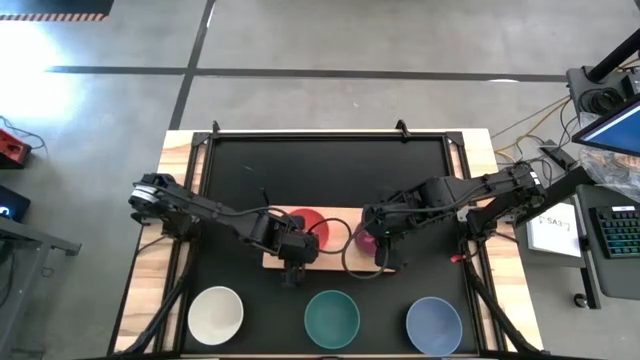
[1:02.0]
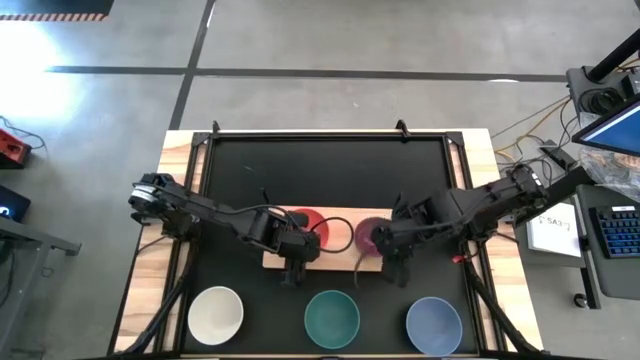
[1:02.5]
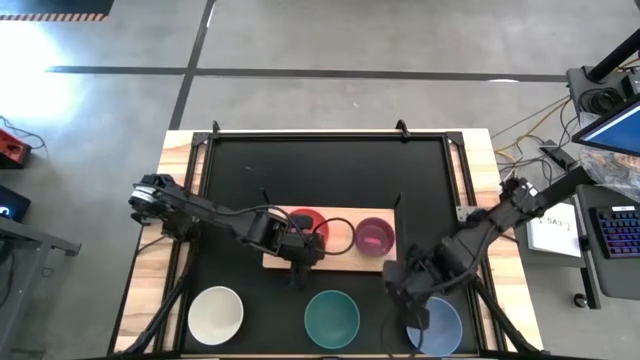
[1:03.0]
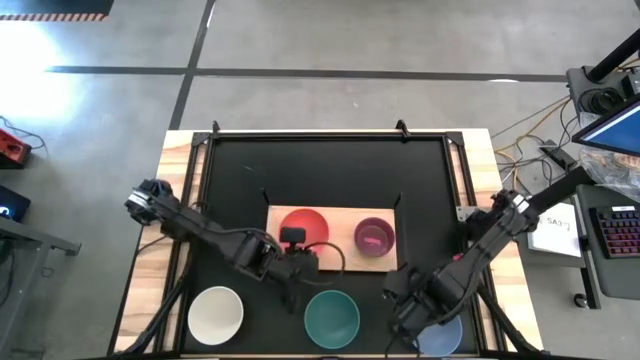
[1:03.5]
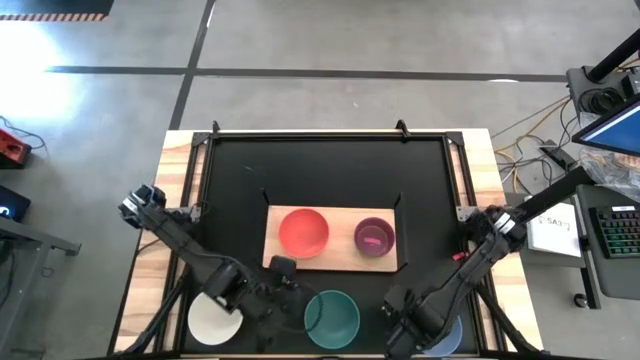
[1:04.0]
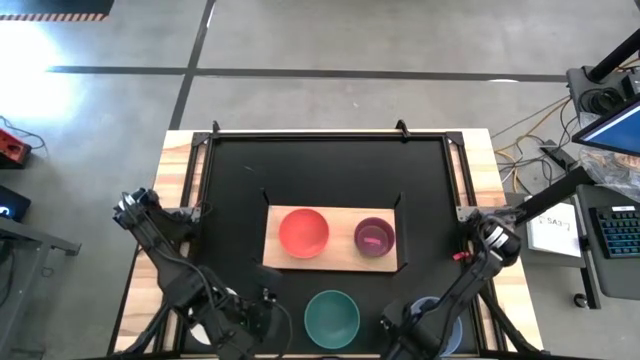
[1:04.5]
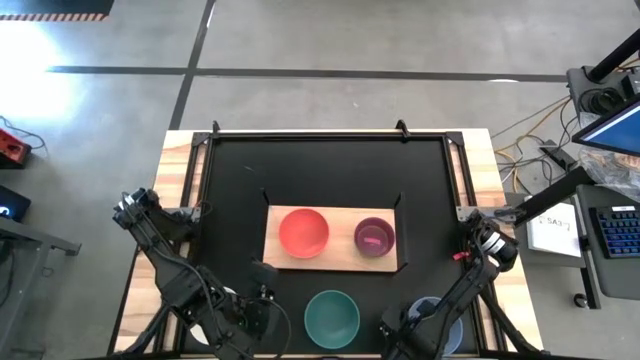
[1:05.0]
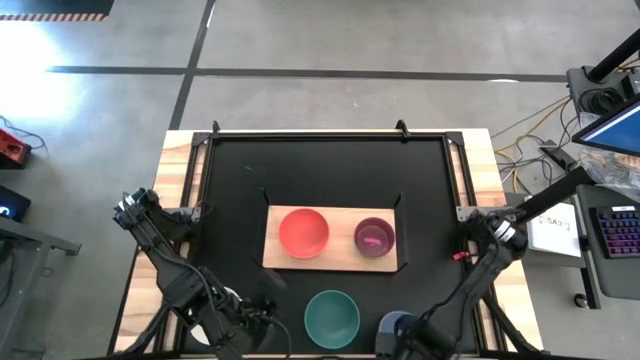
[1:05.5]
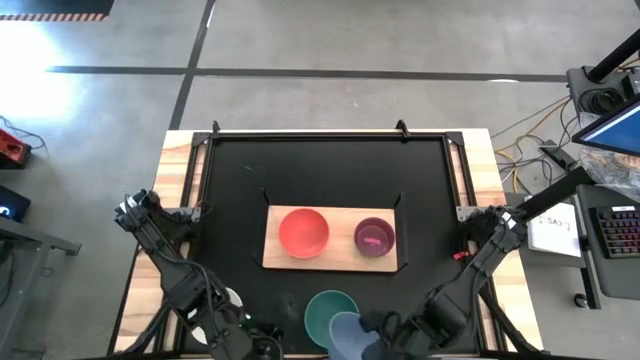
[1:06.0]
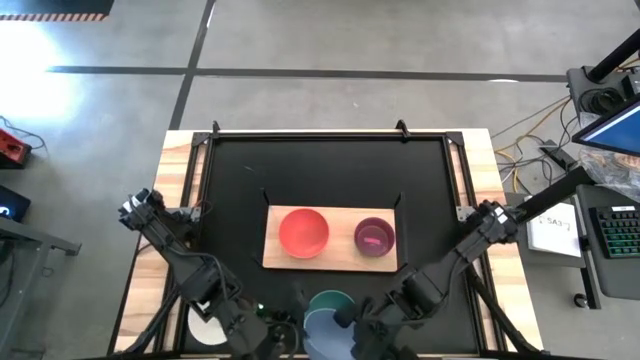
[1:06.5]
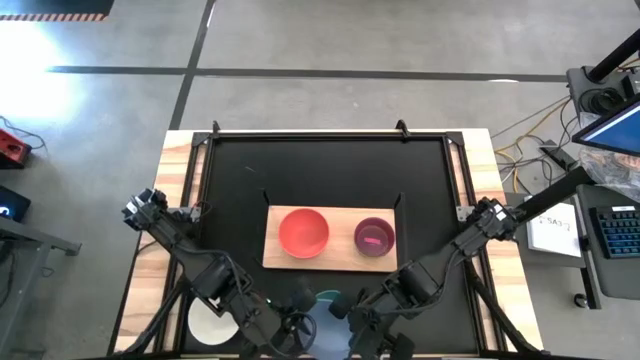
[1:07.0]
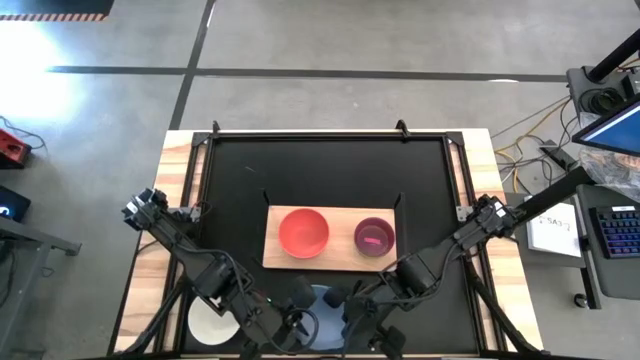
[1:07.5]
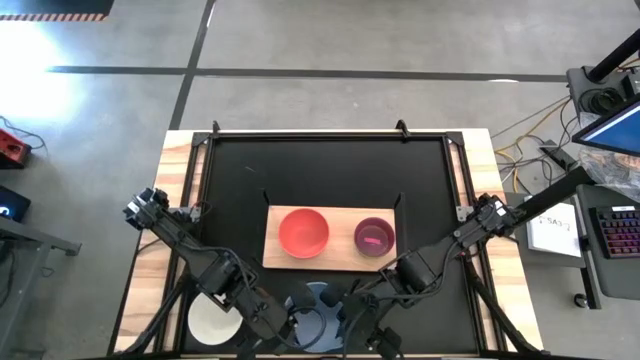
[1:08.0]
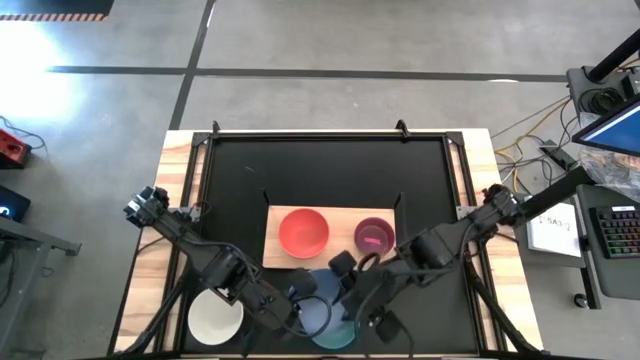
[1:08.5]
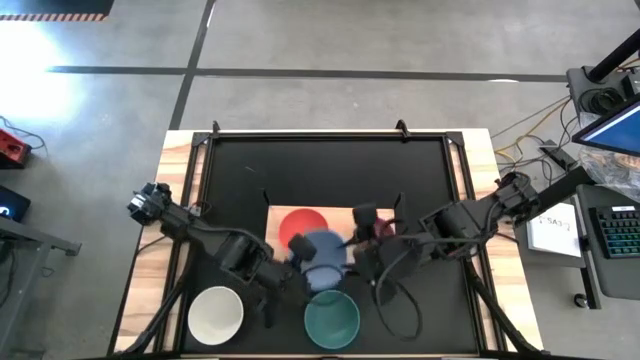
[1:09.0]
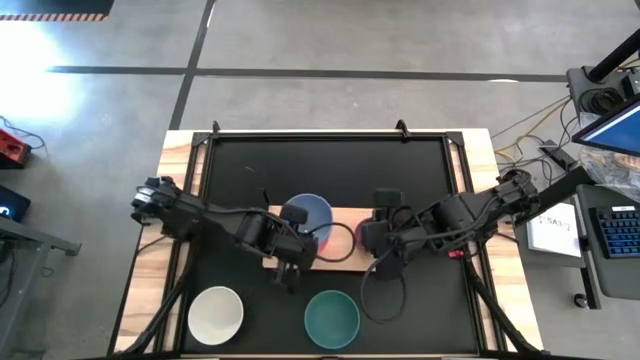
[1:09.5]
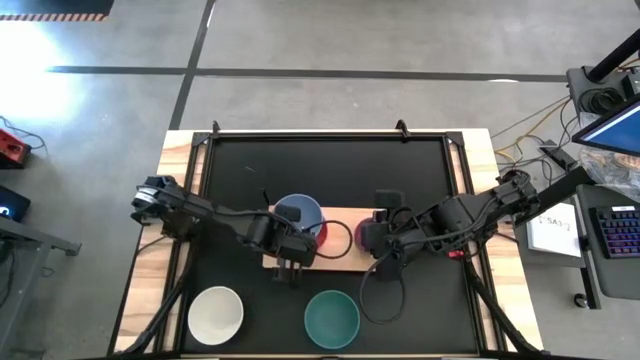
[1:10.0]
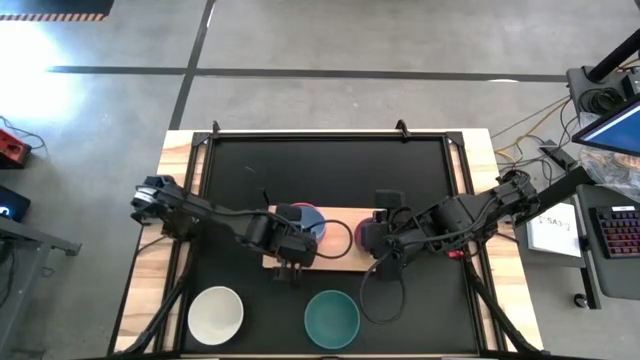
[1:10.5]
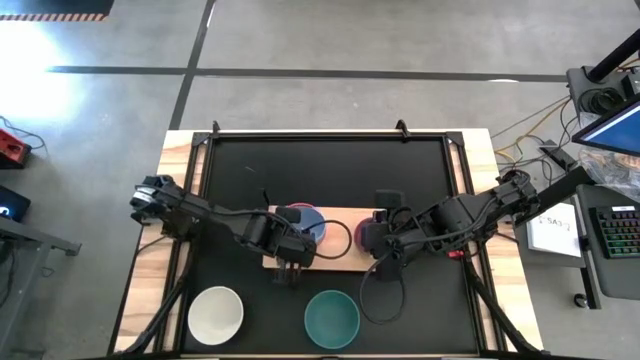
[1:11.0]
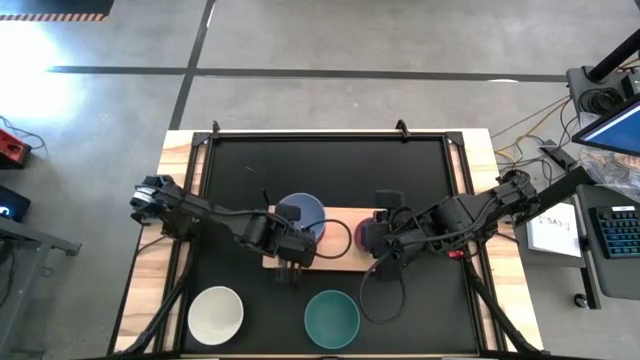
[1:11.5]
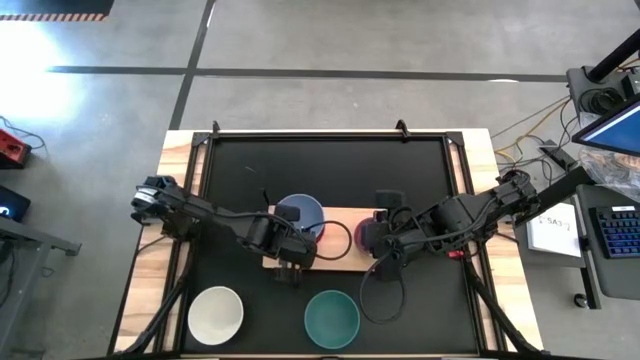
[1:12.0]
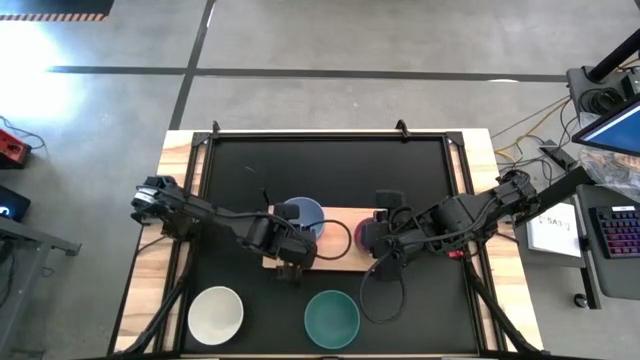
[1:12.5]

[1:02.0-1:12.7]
Task: Place and stack bowls onto a shelf
Stack the blue bowl on top of the orange bowl on the shelf

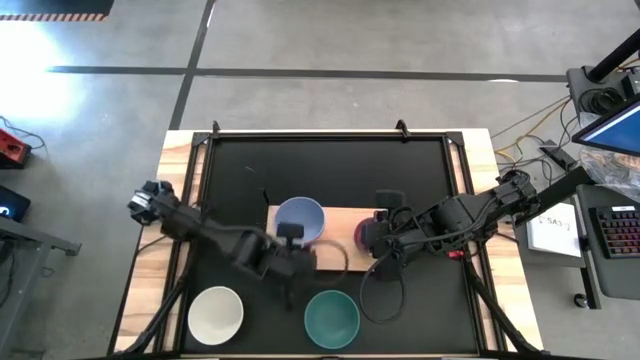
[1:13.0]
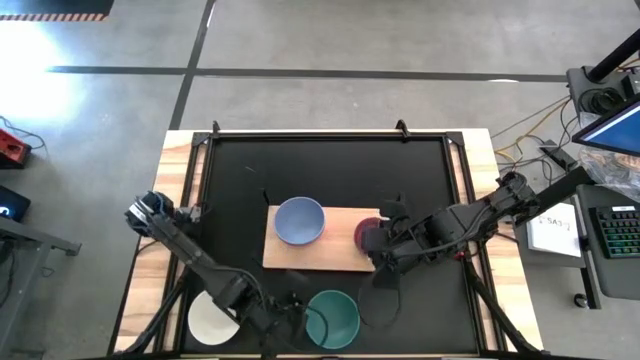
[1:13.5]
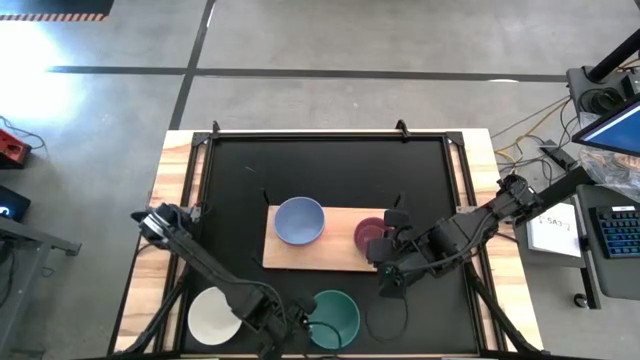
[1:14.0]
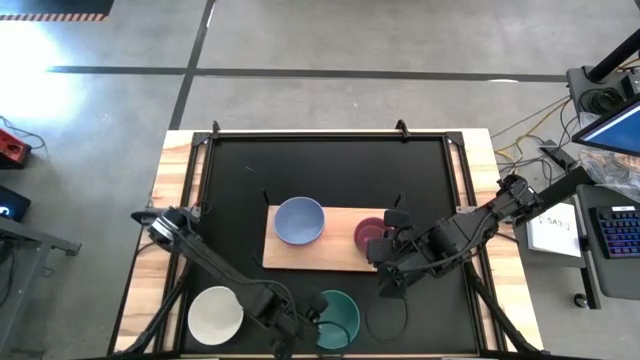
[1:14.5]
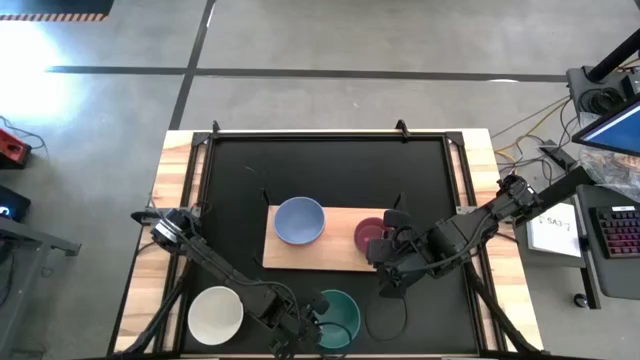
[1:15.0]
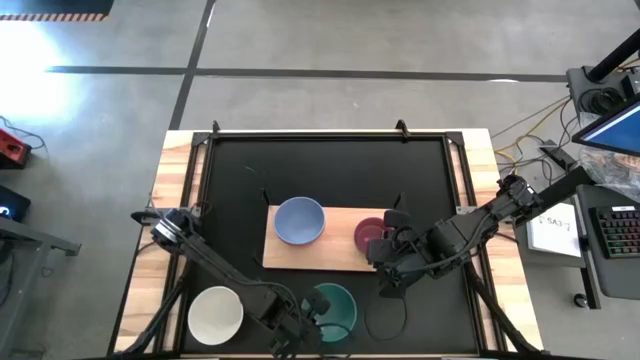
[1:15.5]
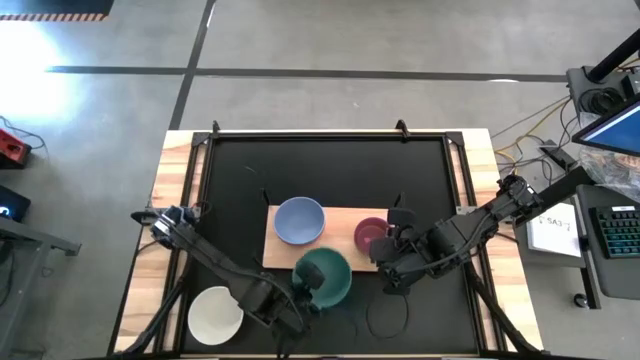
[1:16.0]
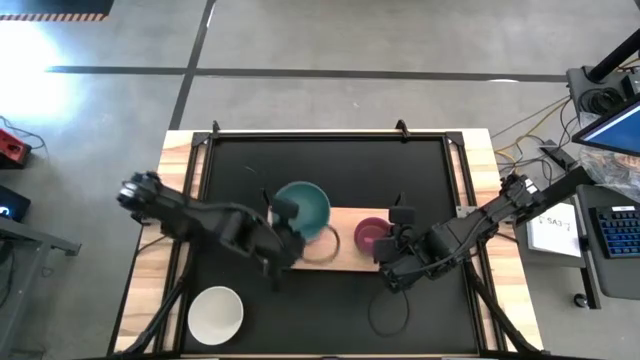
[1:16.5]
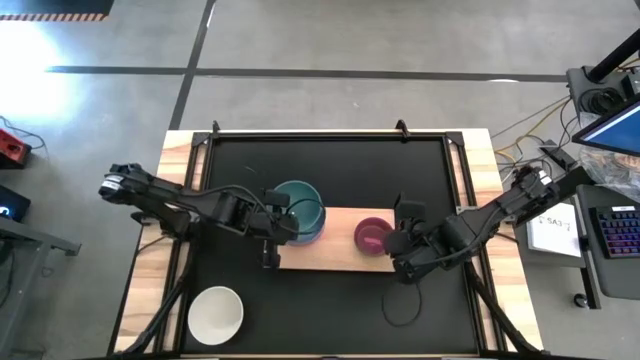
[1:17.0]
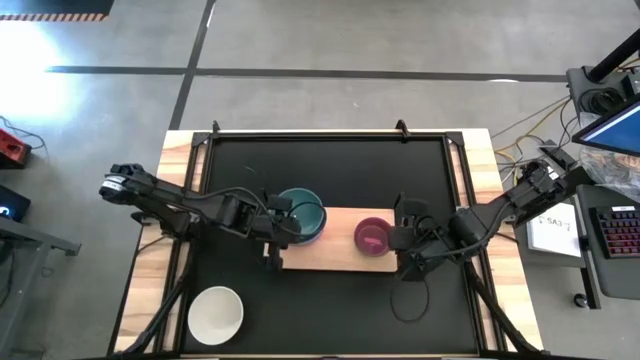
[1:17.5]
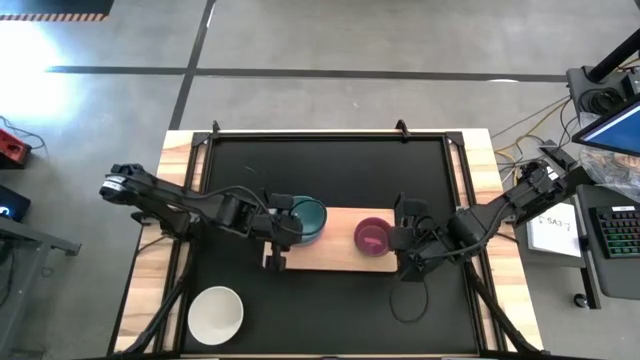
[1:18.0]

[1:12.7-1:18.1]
Stack the green bowl on top of the blue bowl on the shelf

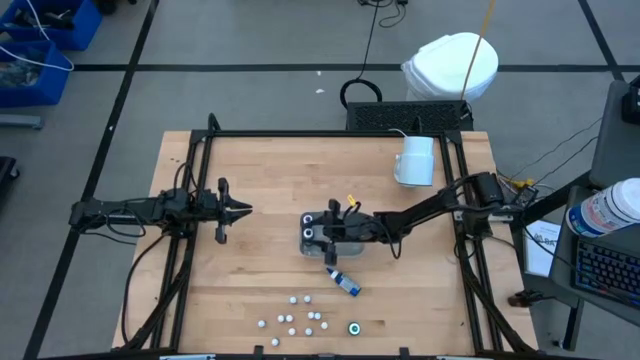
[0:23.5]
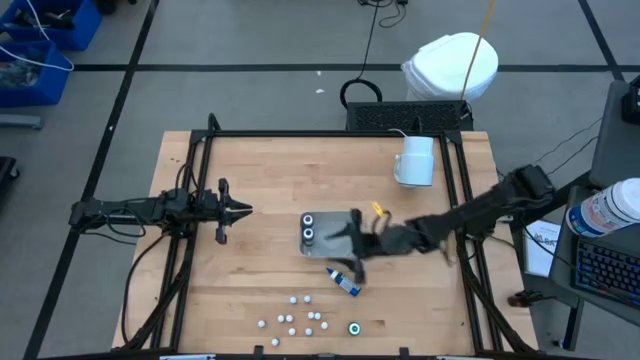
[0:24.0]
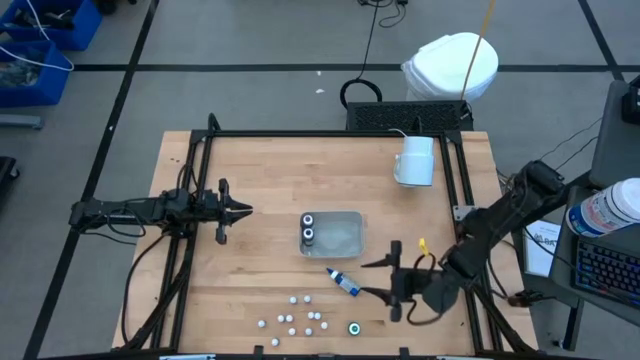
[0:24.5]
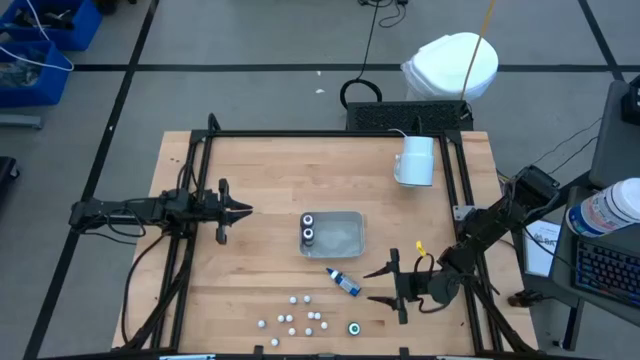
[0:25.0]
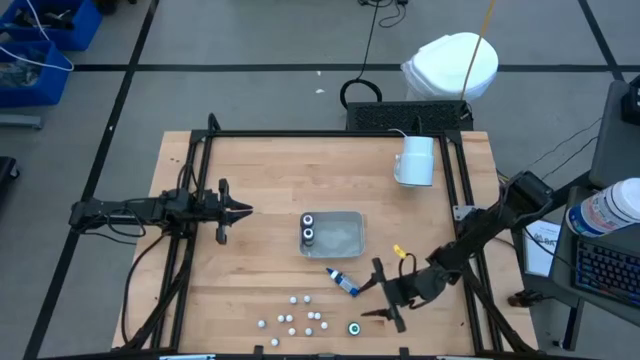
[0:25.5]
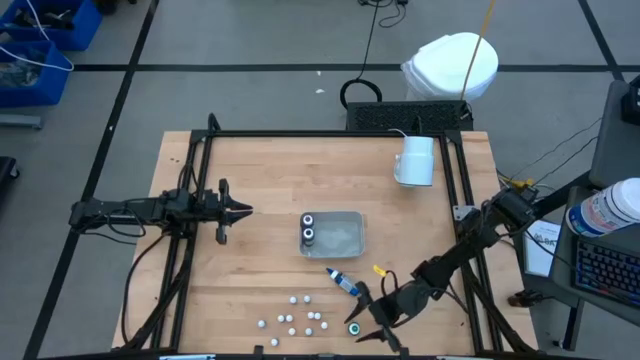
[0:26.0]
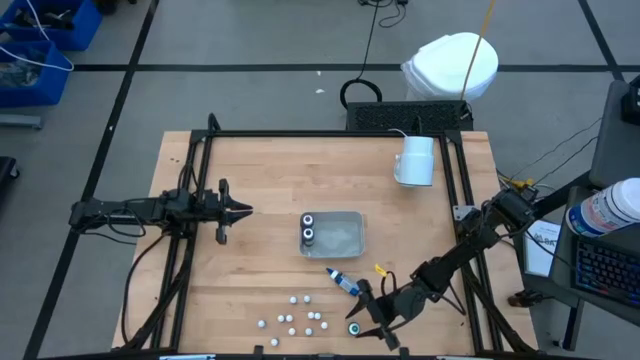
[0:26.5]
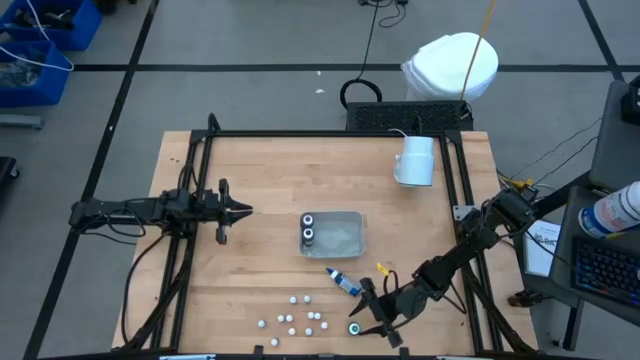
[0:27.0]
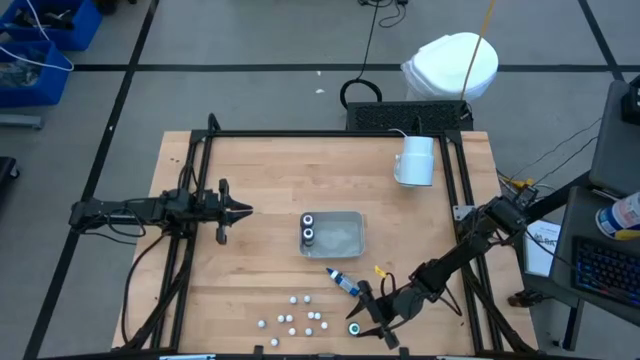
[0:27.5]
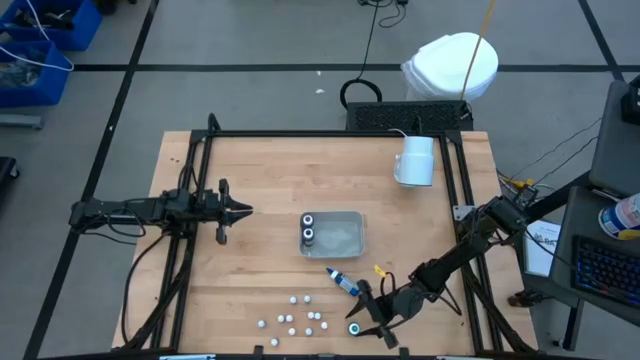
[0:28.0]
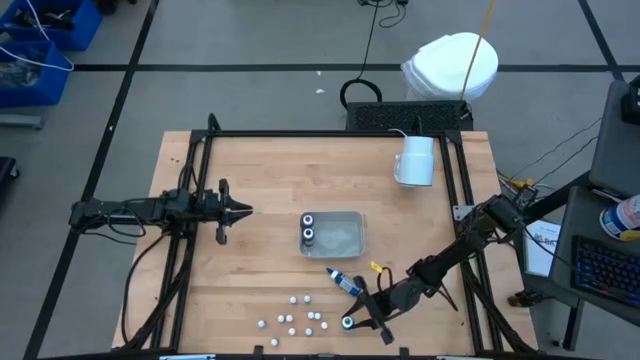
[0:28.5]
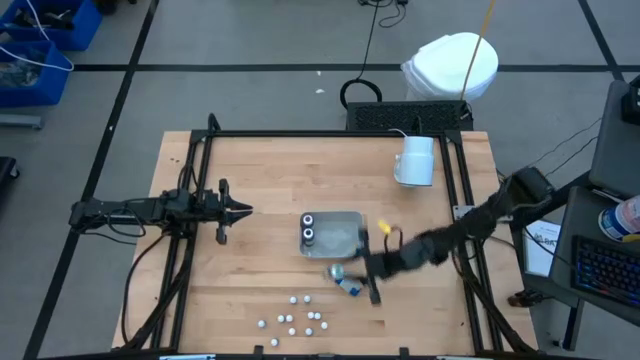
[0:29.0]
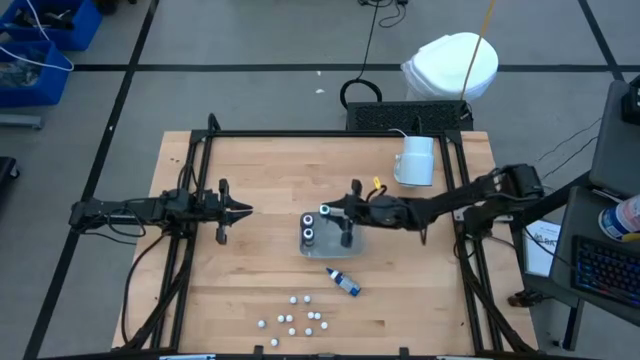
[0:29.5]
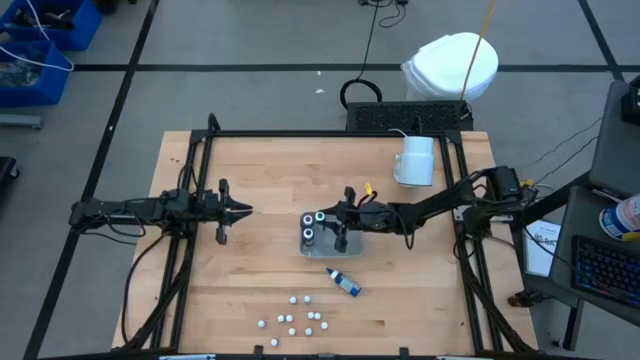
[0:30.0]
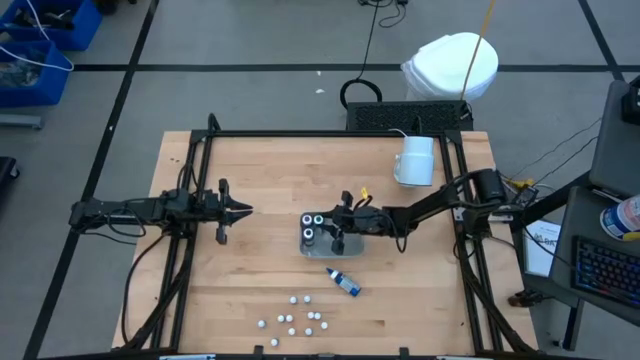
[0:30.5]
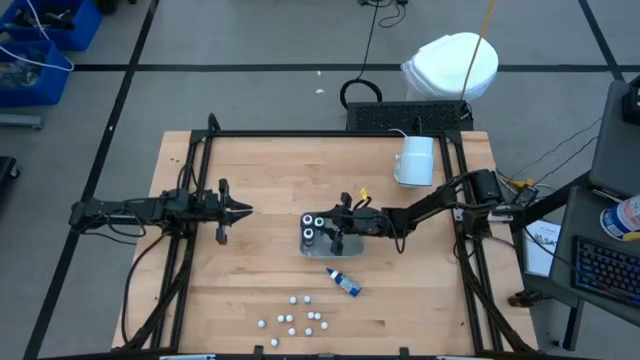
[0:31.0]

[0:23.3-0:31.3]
Task: Pick & Place food coloring
Put the big green food coloring into the gray bin
